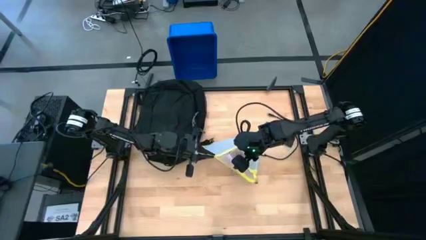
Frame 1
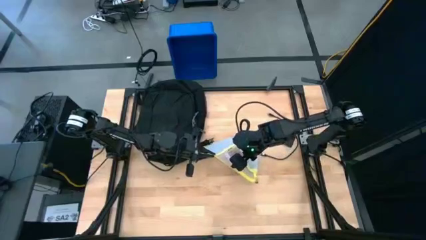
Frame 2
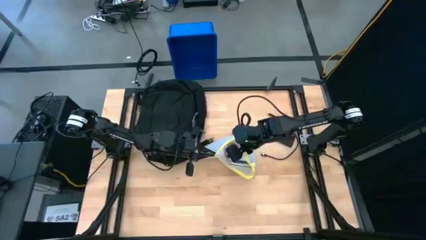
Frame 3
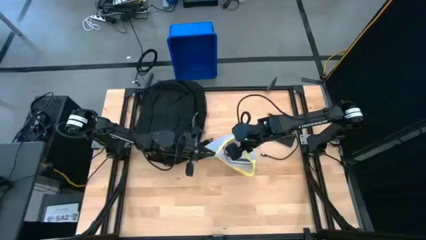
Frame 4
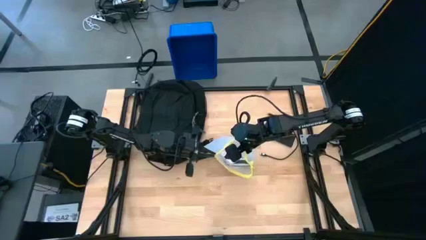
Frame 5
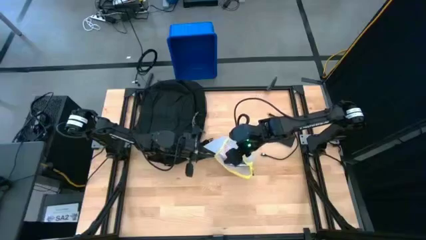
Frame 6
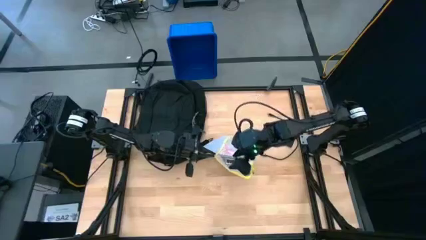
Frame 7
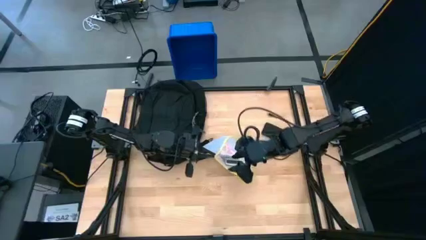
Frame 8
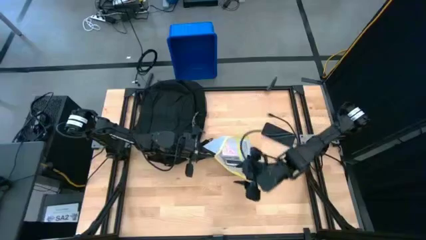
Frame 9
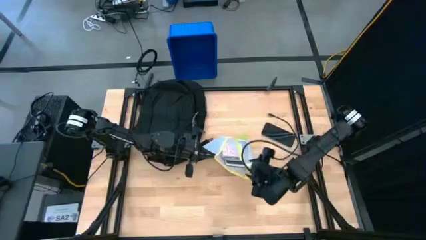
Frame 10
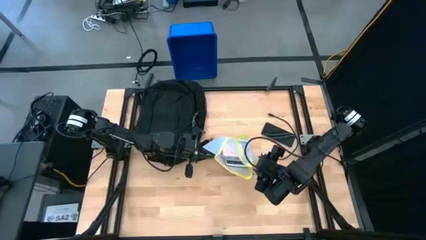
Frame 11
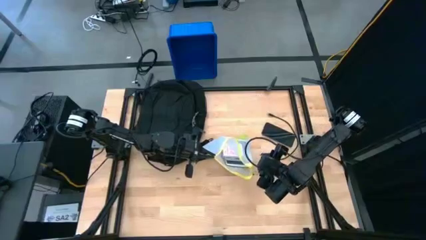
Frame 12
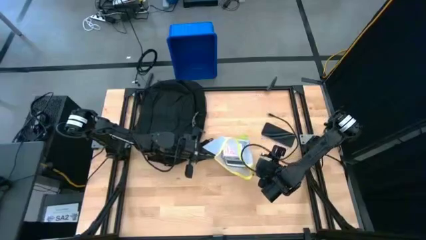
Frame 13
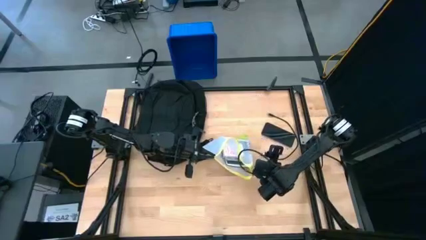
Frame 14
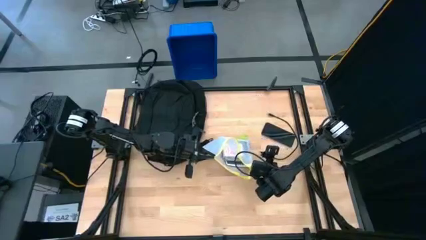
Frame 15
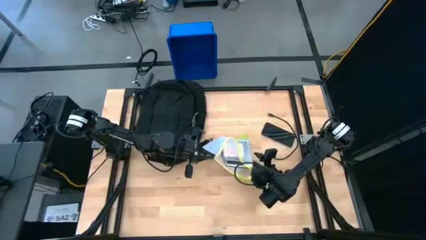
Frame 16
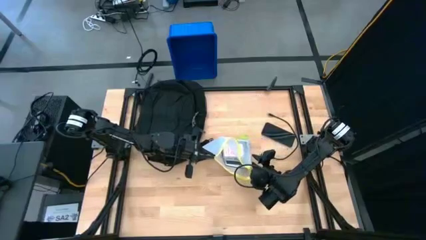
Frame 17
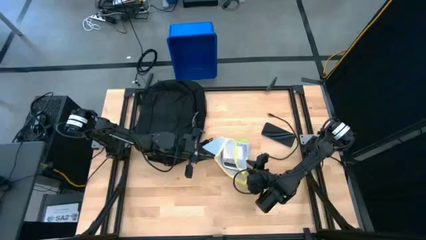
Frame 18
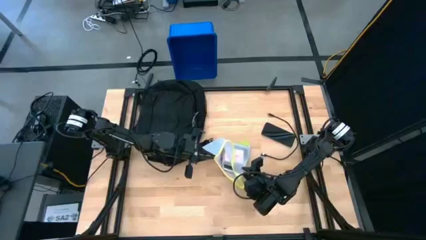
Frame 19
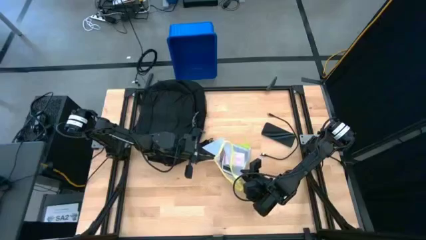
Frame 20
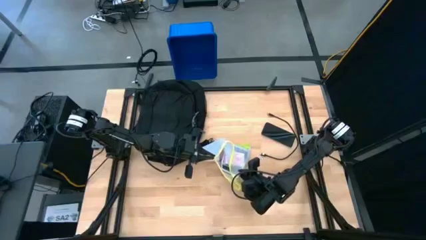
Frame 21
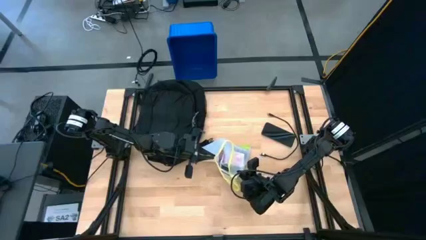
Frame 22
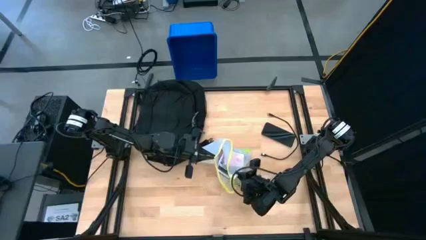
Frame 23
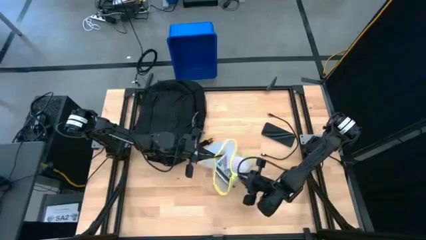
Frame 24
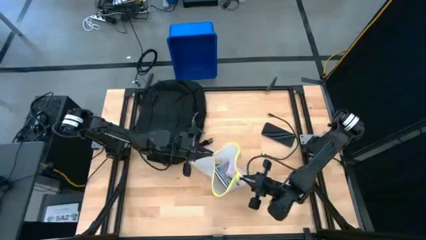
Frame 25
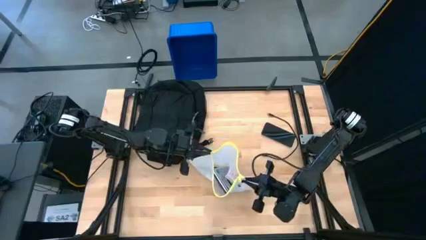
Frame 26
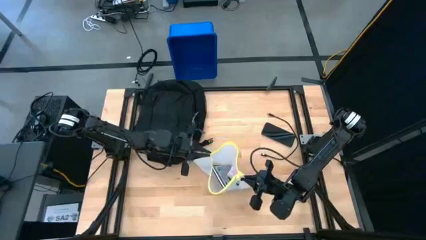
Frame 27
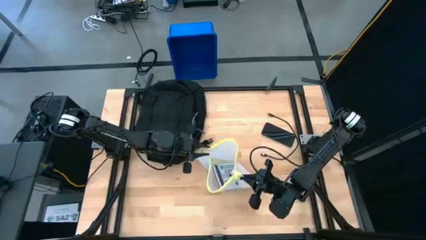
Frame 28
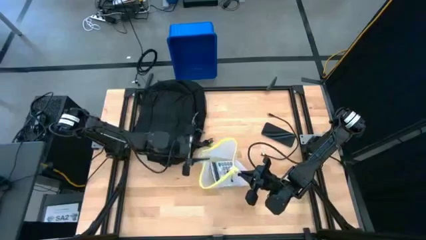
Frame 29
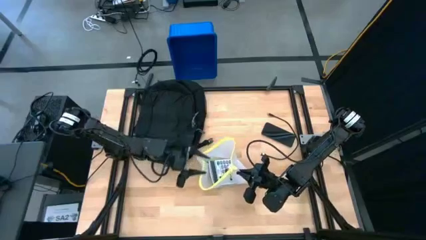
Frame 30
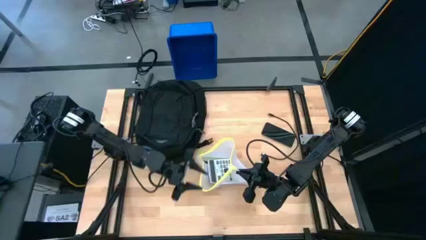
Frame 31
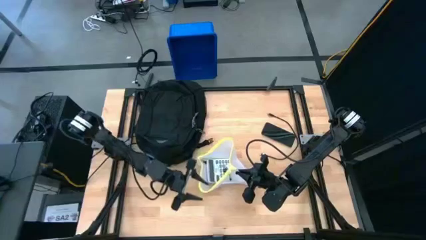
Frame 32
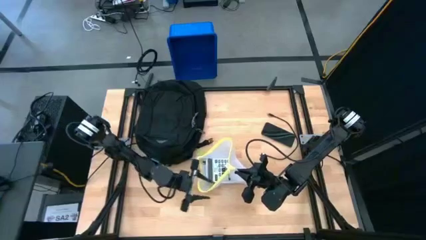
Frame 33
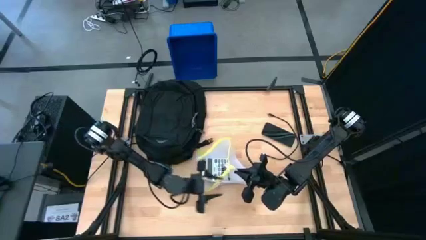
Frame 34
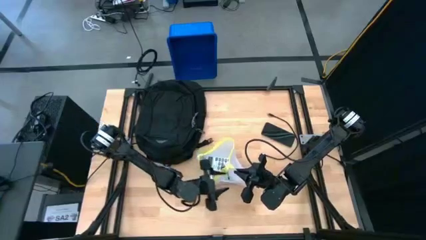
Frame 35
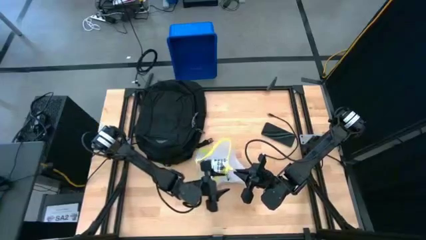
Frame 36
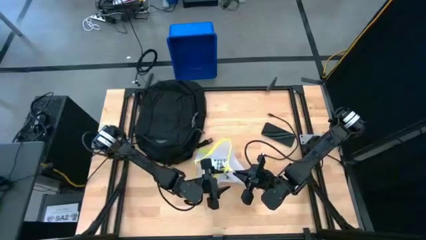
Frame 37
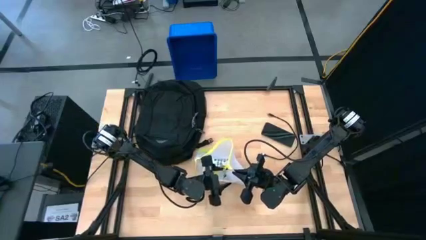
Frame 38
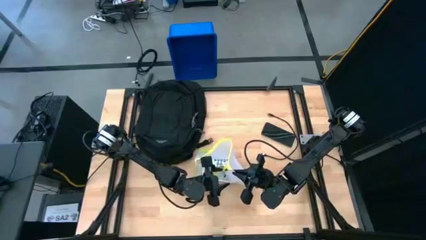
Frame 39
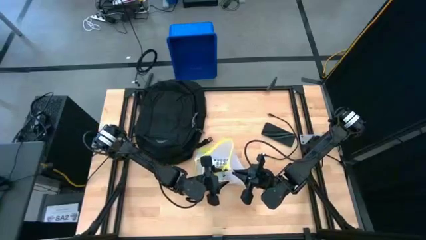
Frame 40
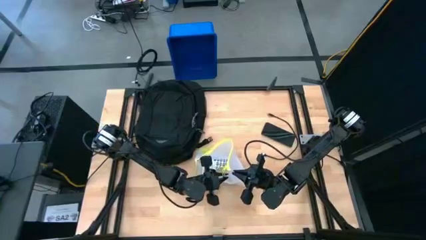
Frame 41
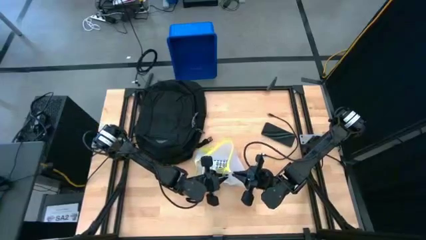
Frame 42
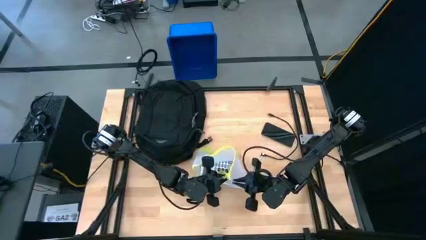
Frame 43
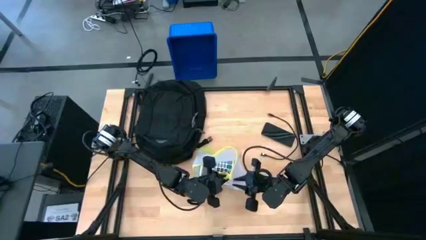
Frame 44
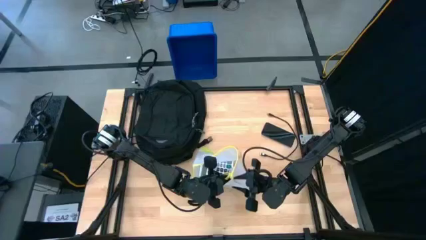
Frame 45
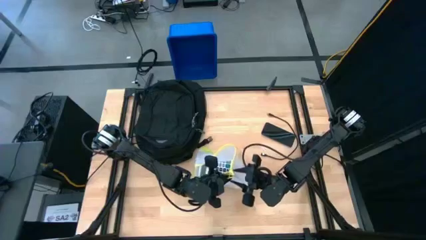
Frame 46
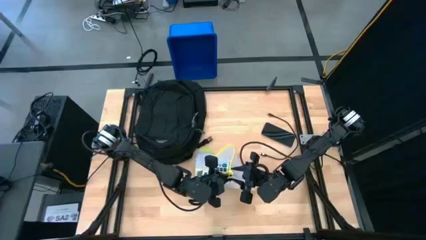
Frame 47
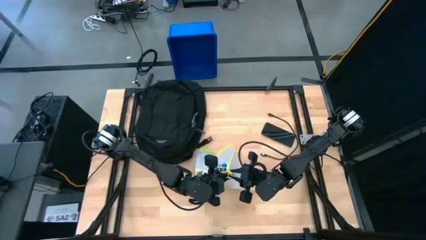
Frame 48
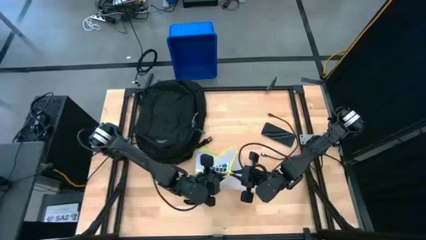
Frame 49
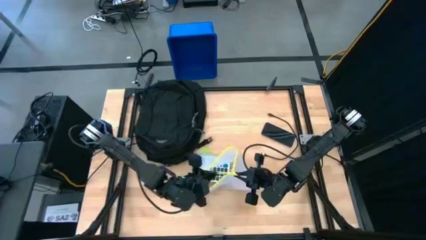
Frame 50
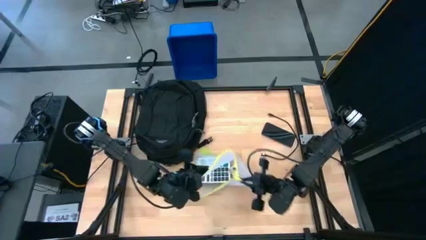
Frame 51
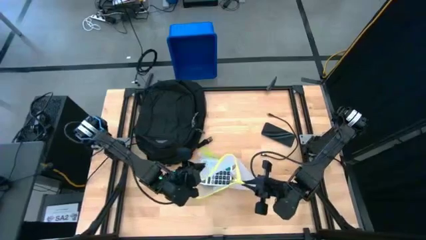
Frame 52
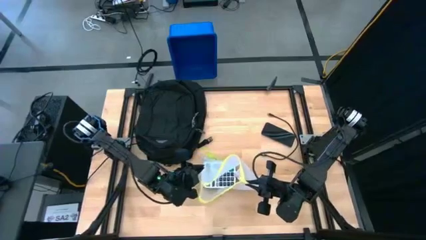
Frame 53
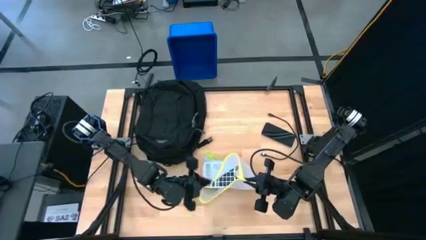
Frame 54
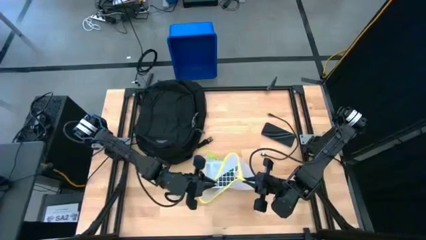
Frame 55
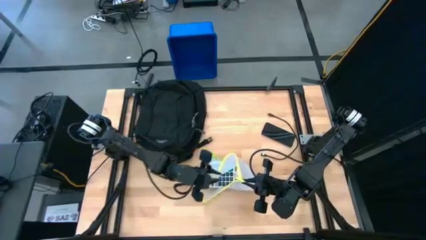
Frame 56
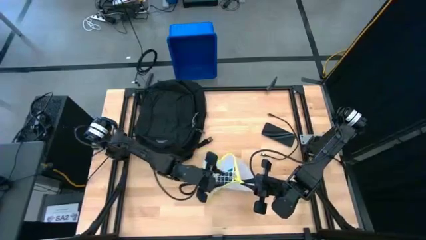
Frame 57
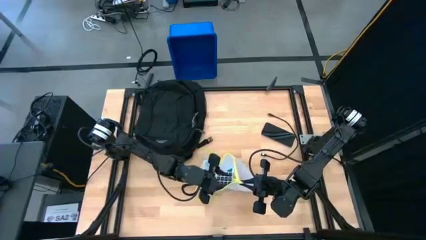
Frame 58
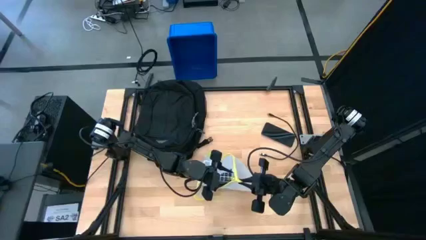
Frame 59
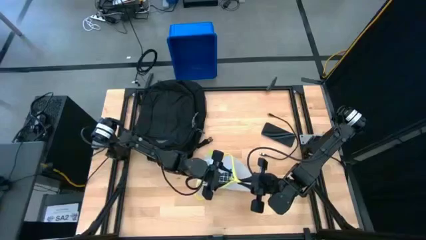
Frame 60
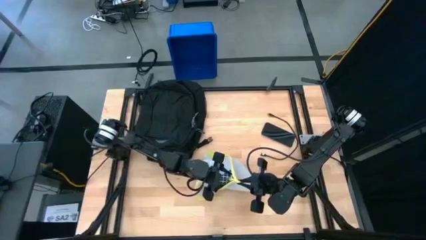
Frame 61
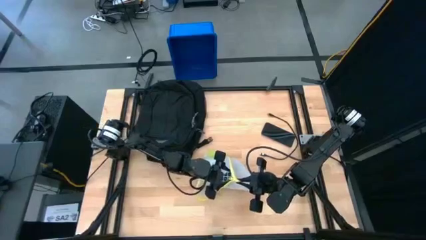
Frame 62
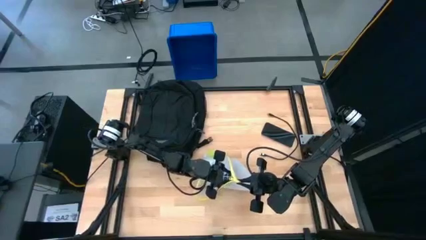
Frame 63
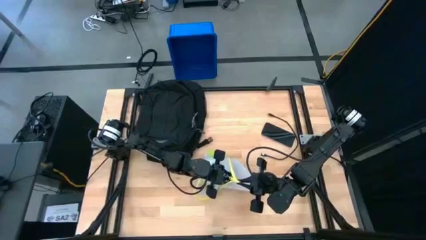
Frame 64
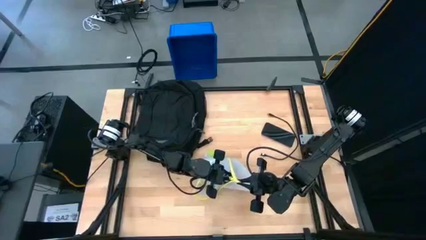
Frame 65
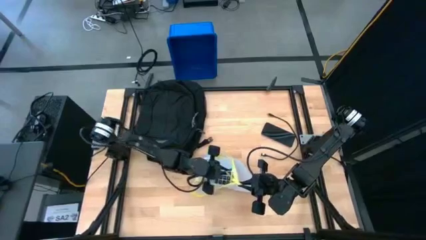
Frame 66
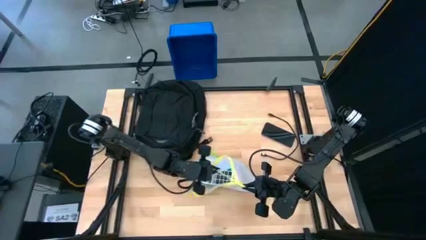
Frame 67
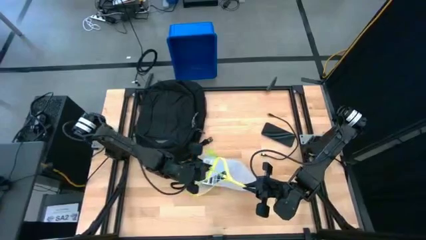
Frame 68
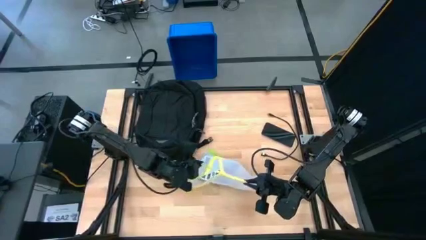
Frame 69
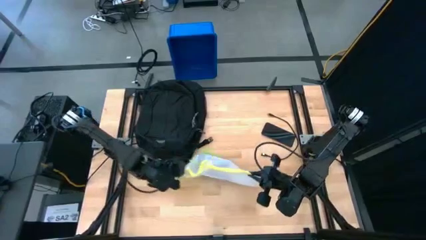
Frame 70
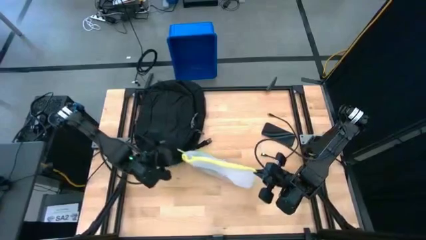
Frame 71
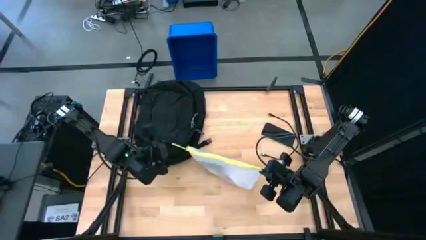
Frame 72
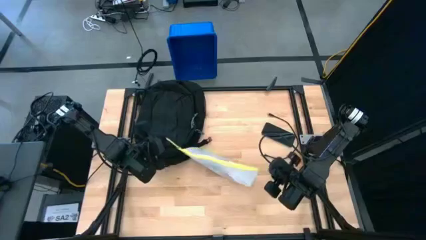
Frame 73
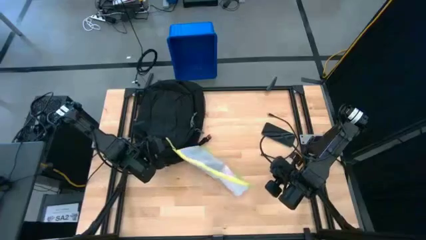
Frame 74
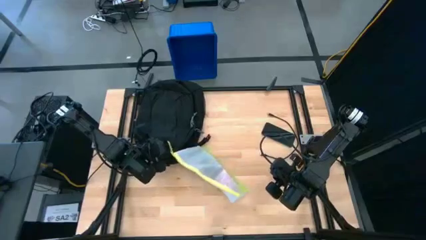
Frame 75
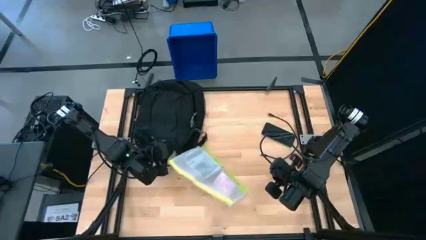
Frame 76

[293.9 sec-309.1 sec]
Task: Unpack backpack
Close the zip lock bag

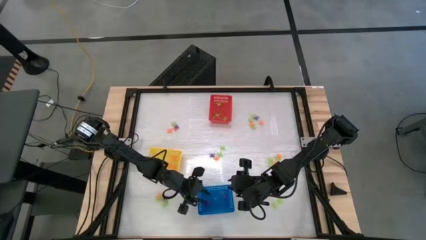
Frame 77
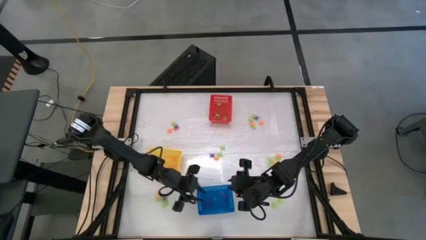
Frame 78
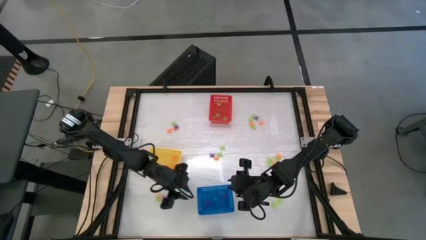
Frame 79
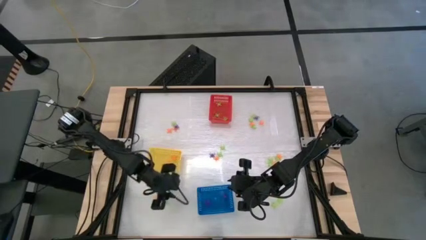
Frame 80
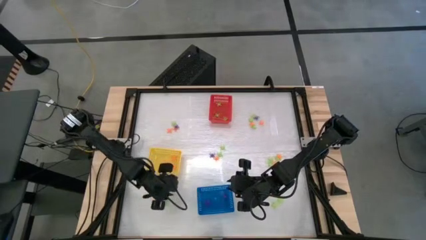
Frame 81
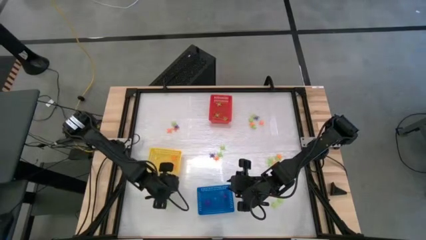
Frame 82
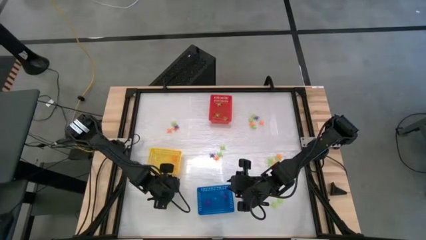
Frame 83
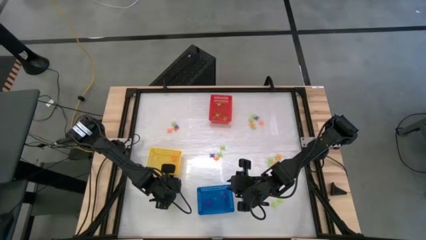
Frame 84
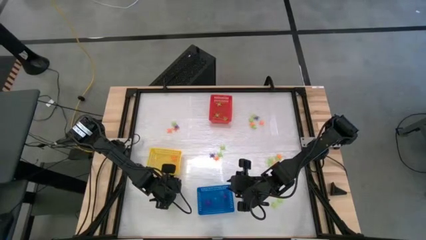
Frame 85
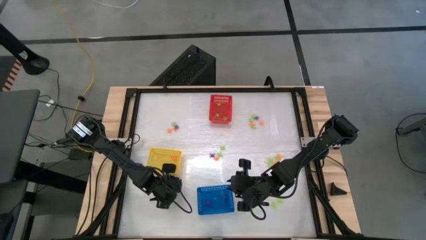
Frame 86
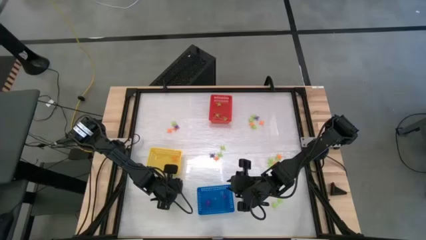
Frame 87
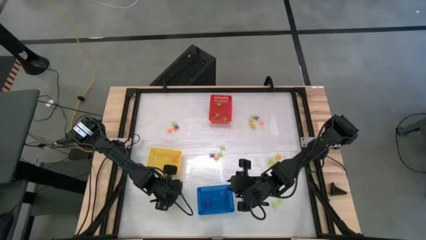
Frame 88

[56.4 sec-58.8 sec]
Task: Sort Halloween decoration
Put the orange spider toy into the yellow basket
